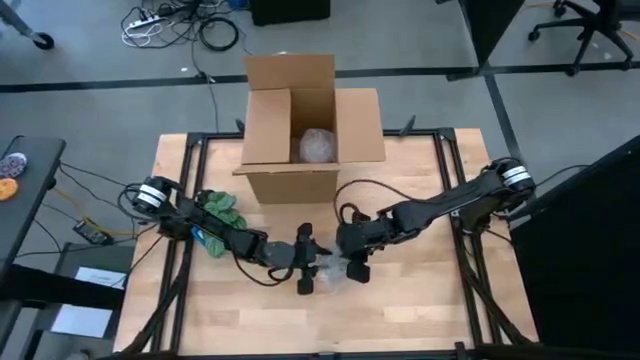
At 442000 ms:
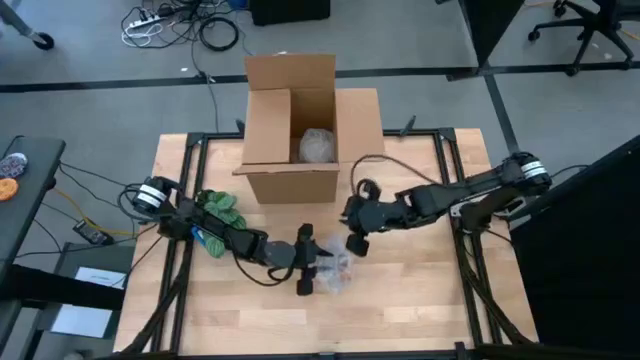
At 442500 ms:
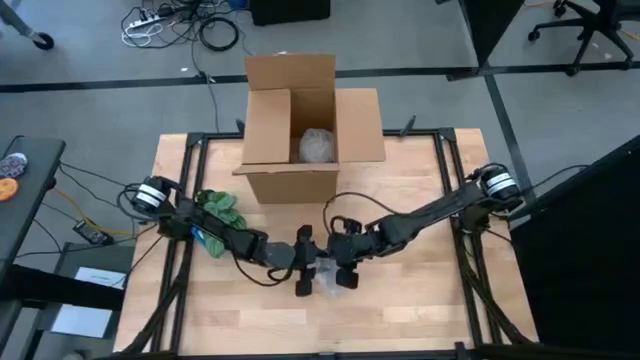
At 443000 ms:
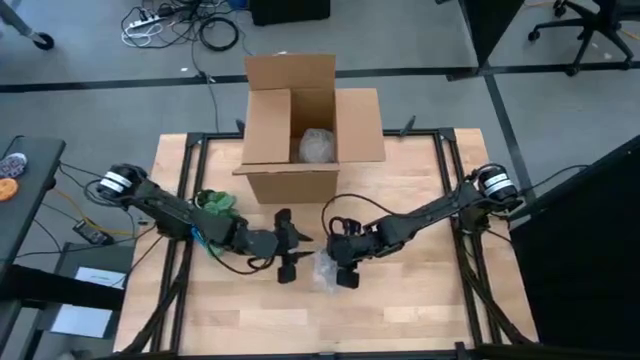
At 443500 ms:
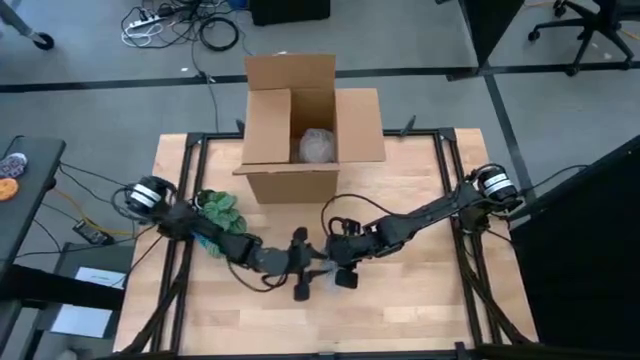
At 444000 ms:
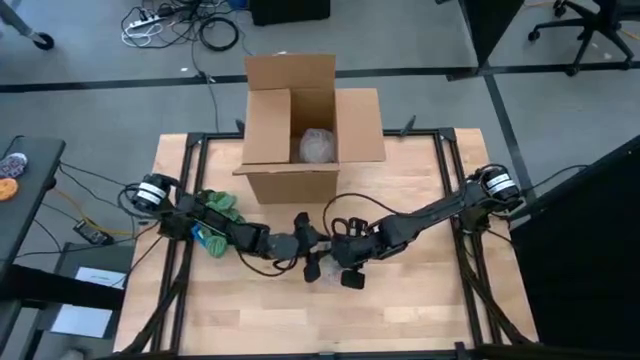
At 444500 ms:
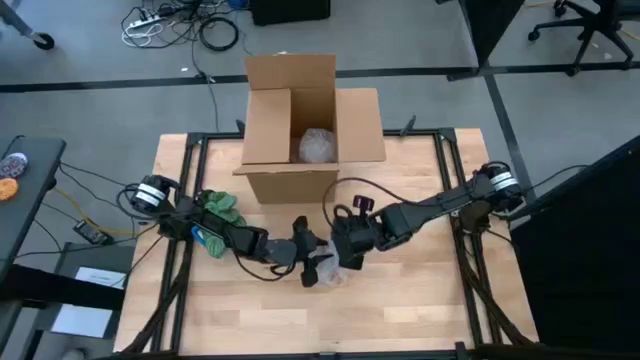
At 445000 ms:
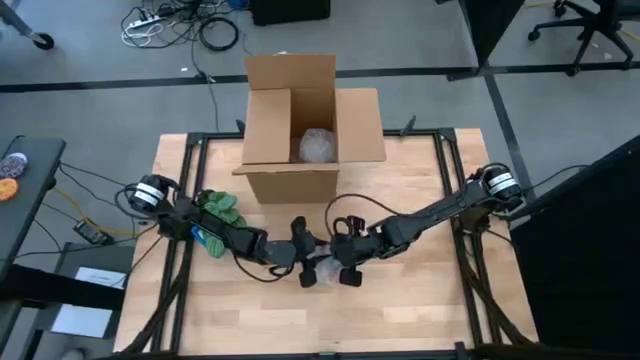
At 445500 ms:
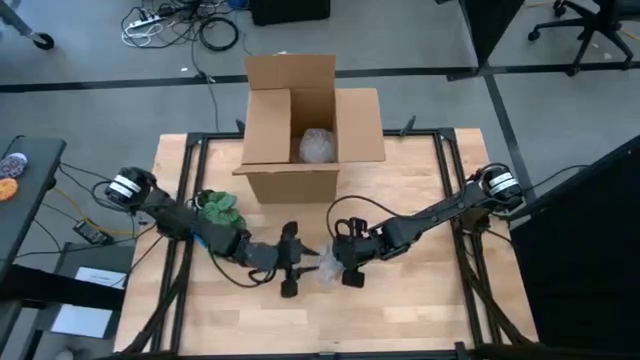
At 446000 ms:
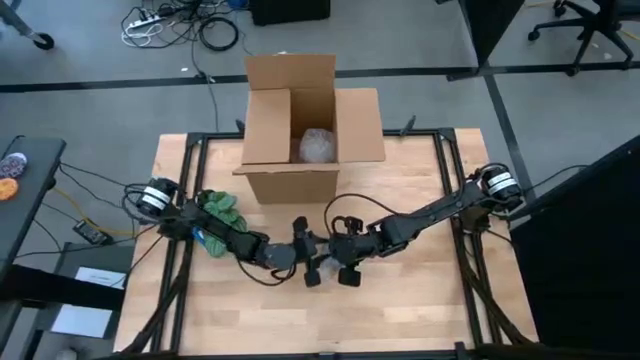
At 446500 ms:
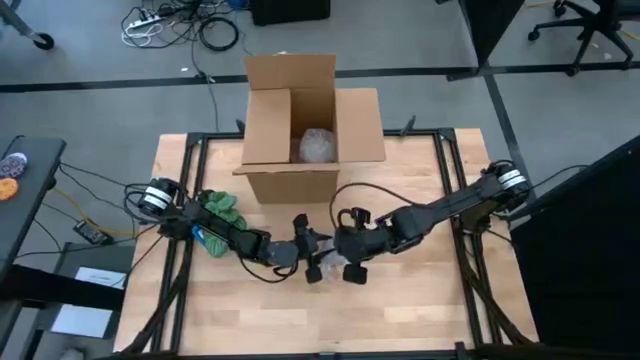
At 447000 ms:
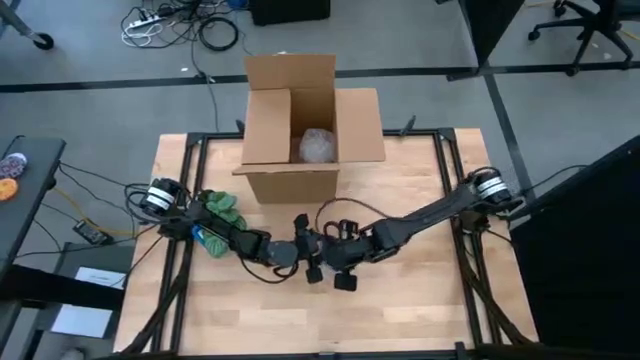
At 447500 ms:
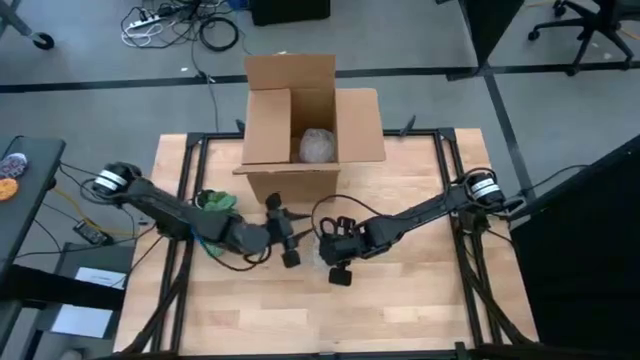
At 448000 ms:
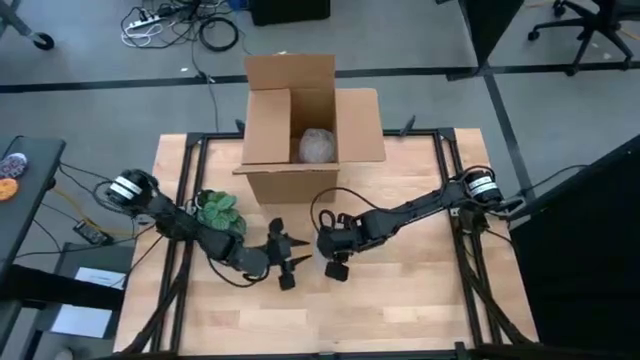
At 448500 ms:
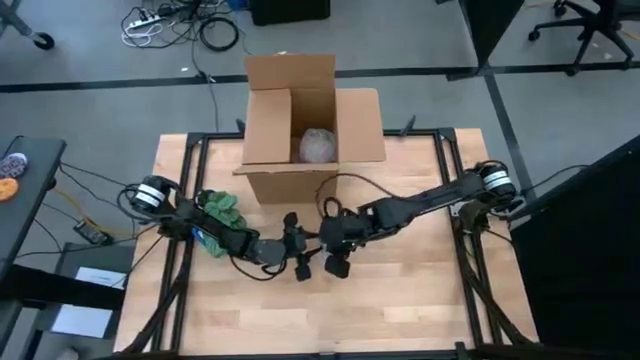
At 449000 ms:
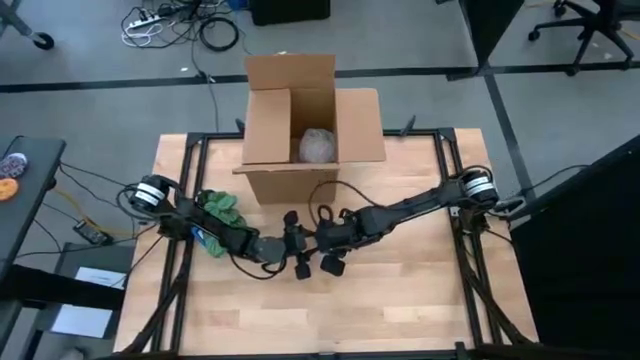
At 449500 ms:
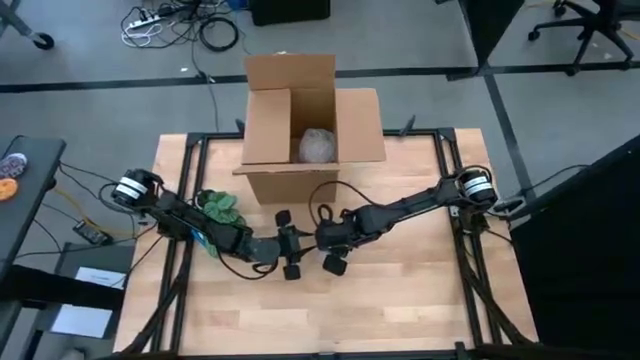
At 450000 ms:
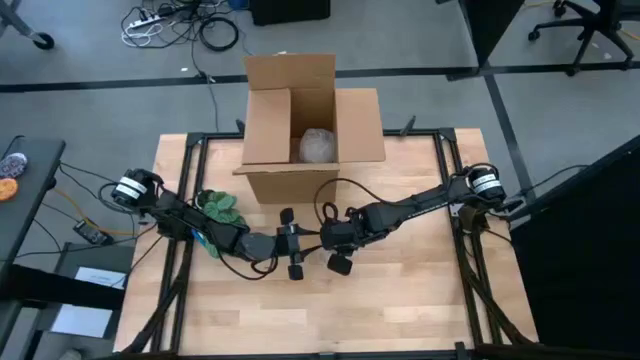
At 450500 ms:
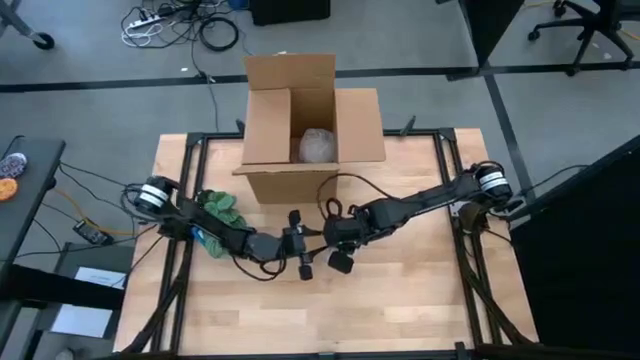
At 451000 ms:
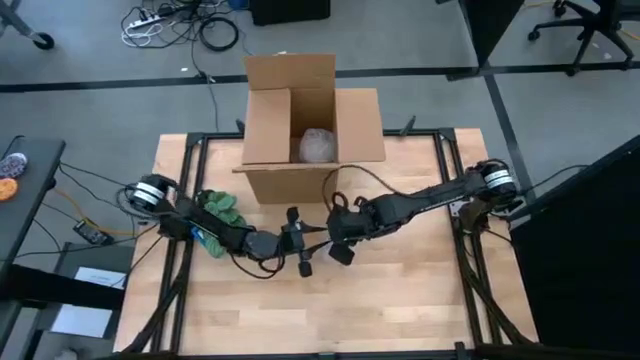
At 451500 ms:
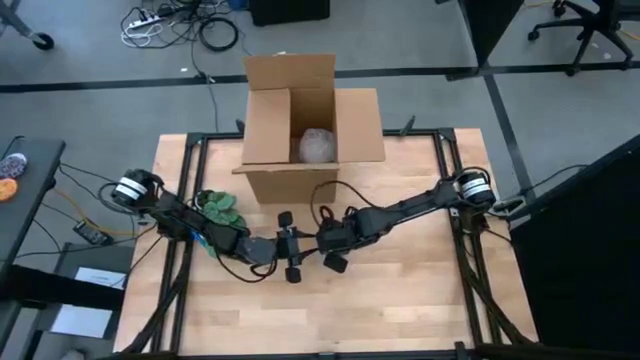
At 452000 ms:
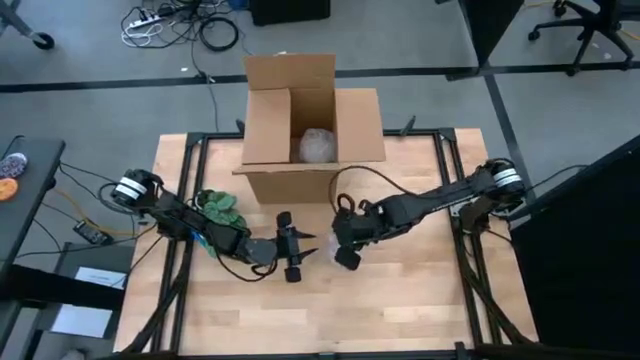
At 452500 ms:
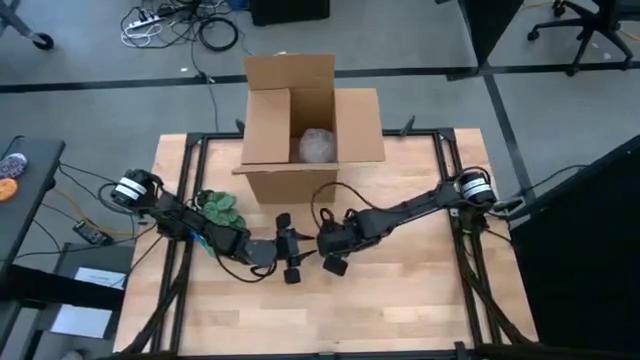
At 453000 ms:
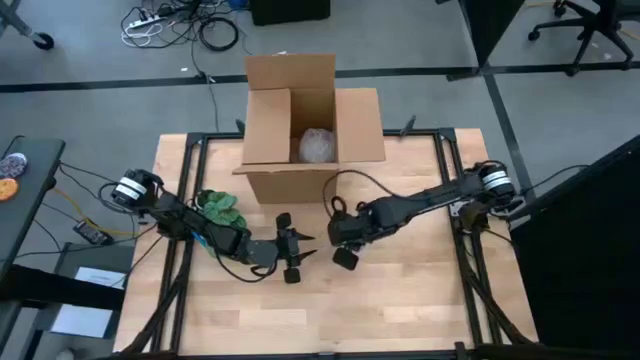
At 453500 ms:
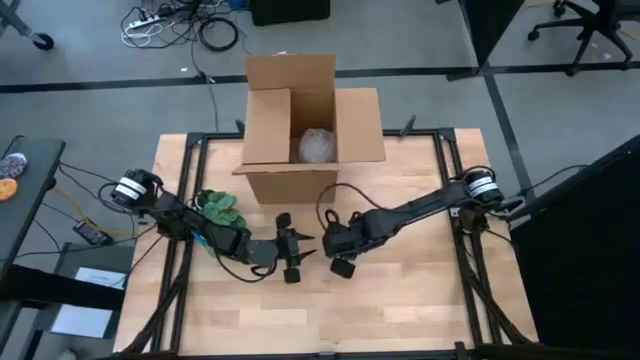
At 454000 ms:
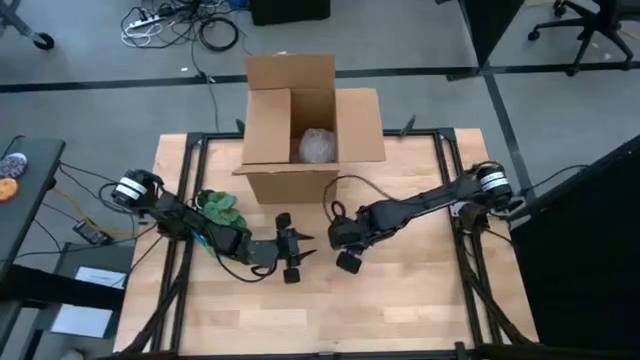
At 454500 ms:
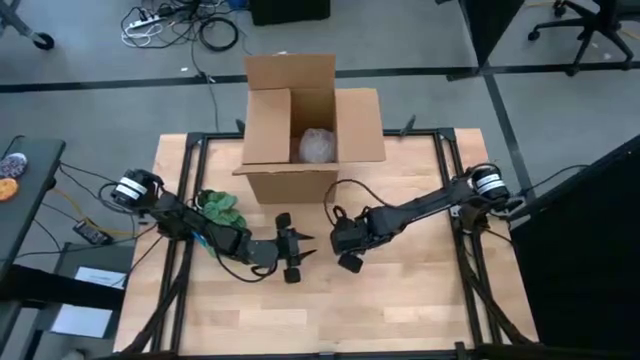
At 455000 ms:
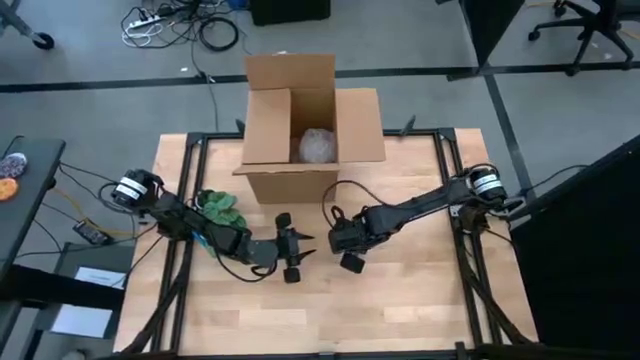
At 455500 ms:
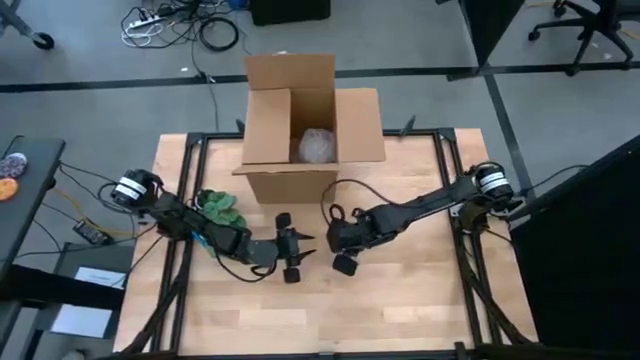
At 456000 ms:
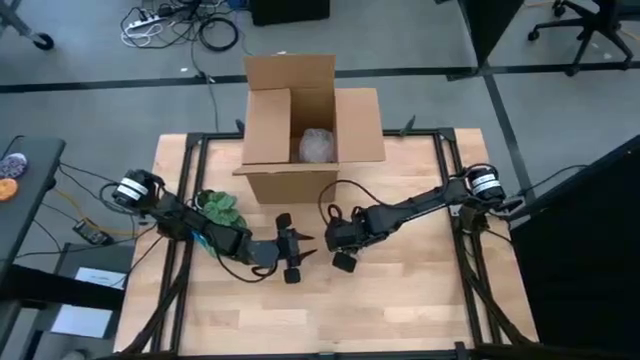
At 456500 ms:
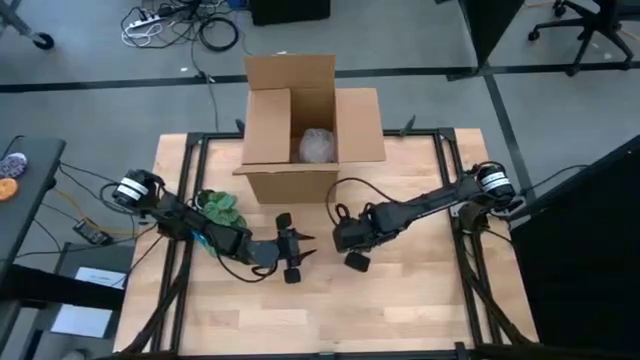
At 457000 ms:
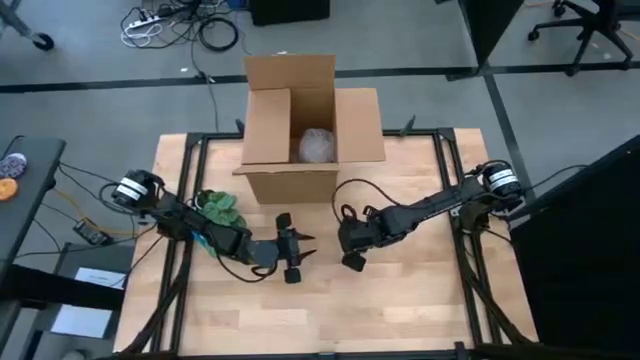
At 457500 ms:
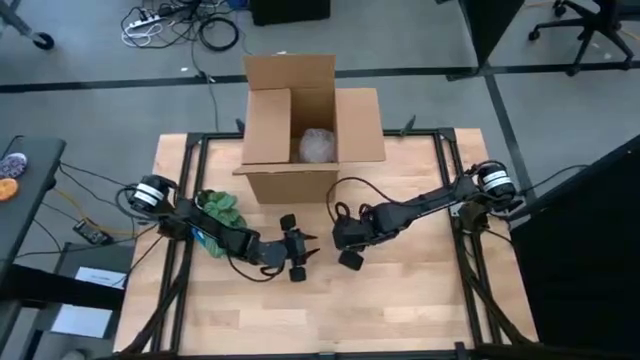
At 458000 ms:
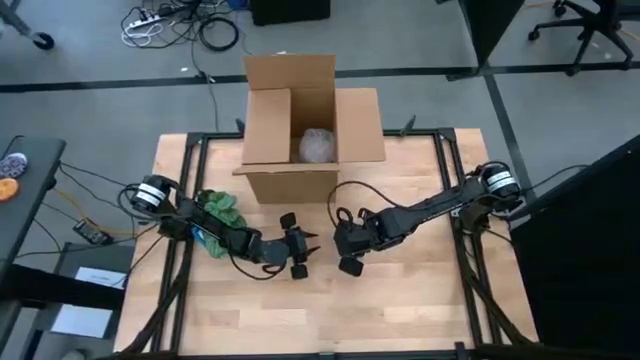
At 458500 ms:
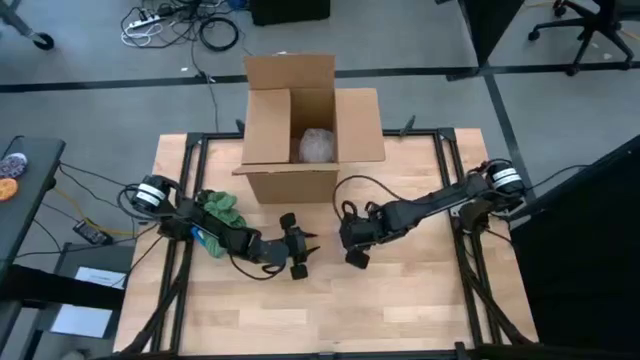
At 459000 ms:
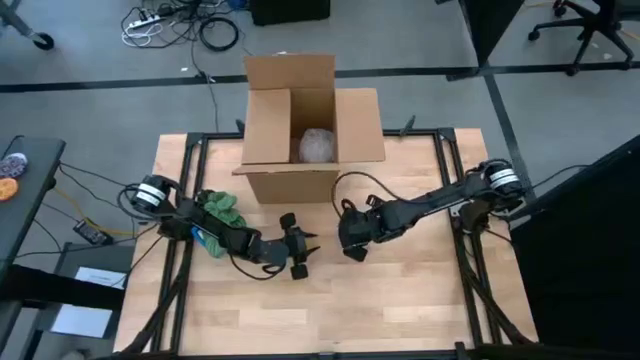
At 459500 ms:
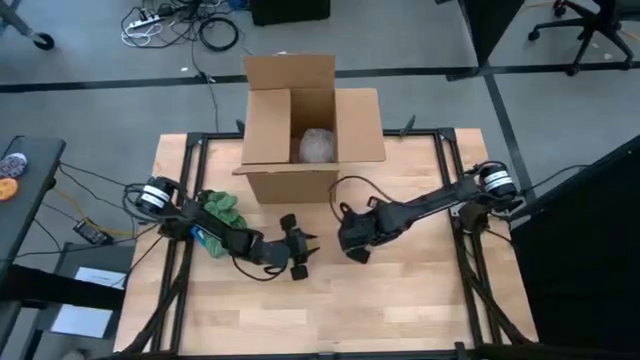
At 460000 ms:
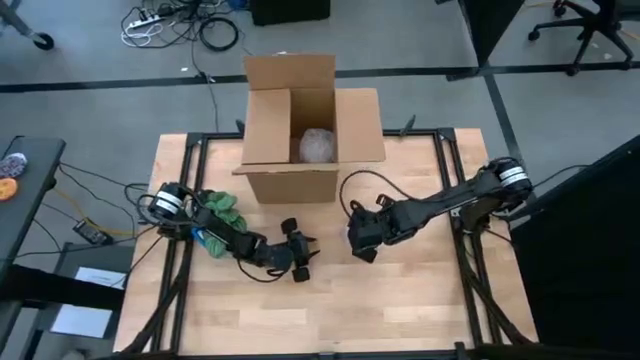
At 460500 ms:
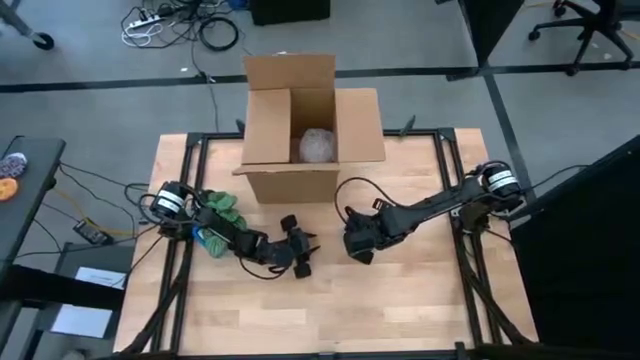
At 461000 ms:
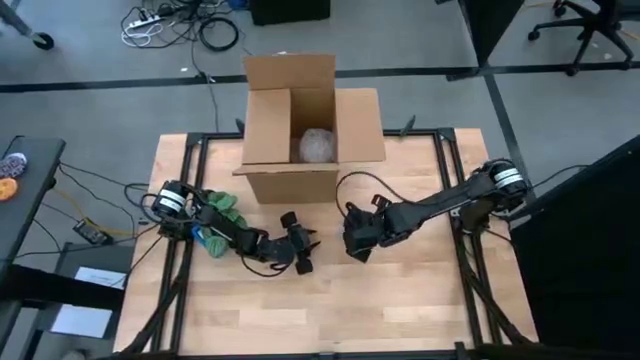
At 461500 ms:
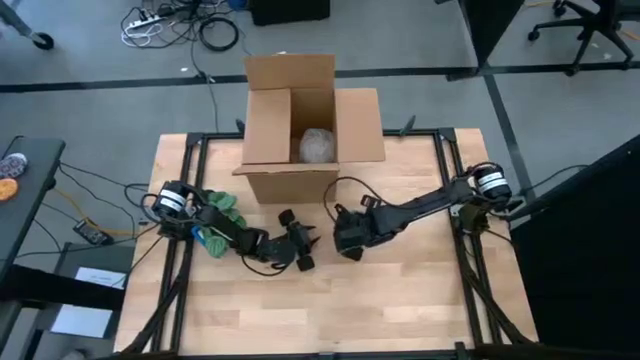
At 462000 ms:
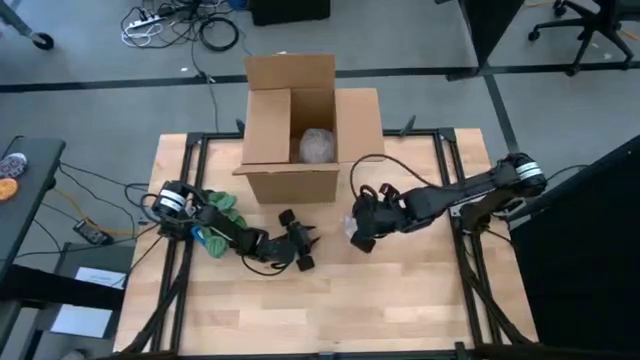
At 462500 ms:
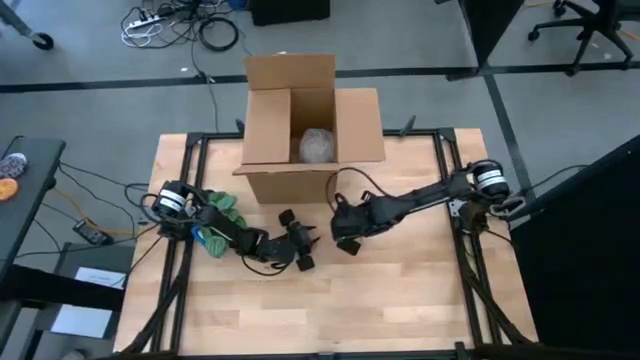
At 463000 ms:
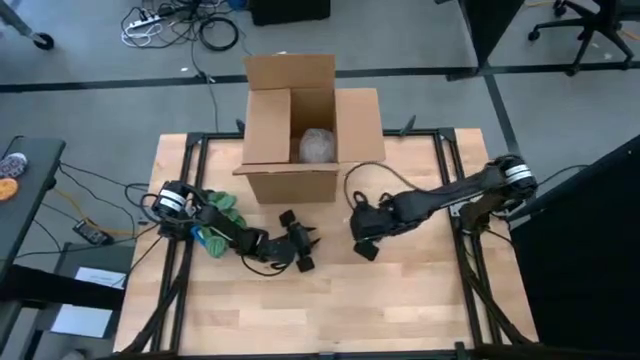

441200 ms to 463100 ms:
Task: wrap mug
Wrap the orange mug with the bubble wrap
